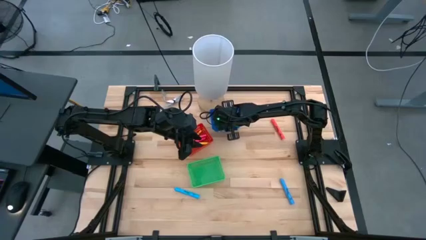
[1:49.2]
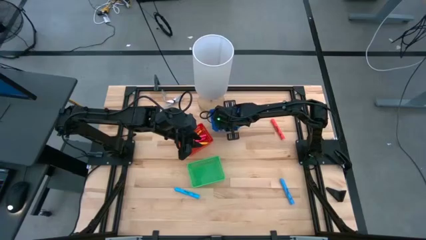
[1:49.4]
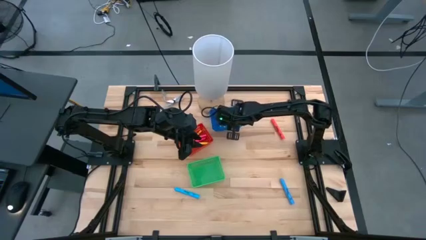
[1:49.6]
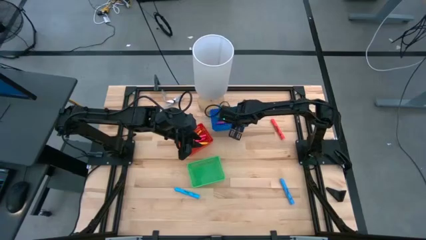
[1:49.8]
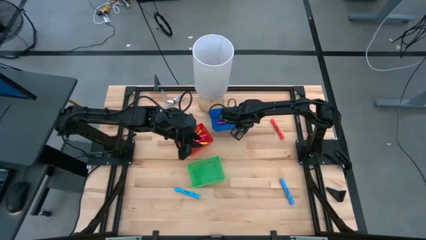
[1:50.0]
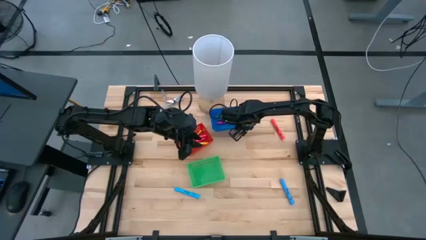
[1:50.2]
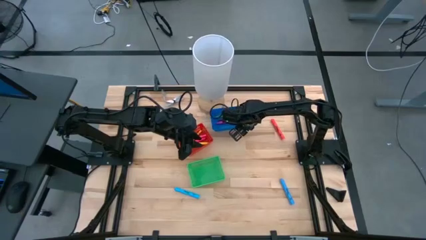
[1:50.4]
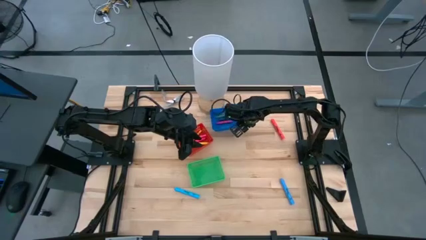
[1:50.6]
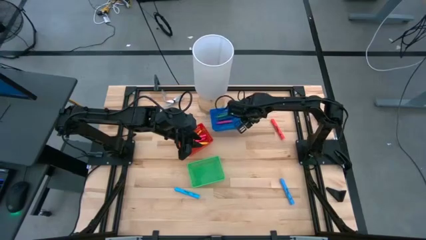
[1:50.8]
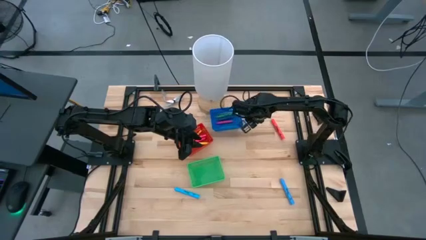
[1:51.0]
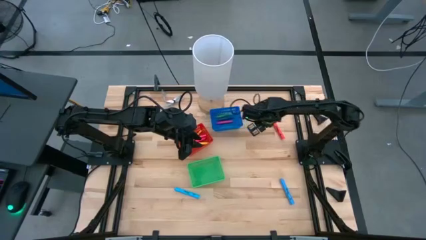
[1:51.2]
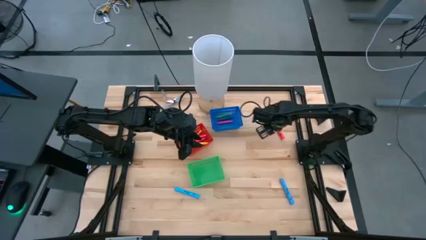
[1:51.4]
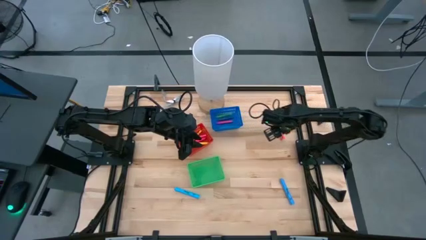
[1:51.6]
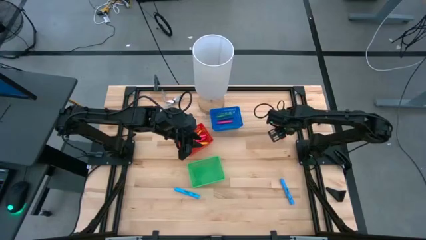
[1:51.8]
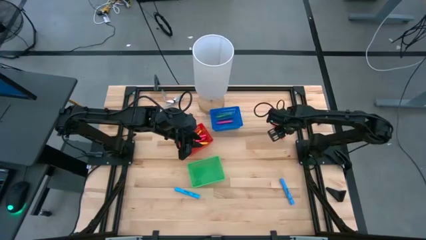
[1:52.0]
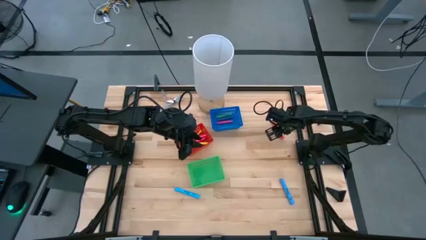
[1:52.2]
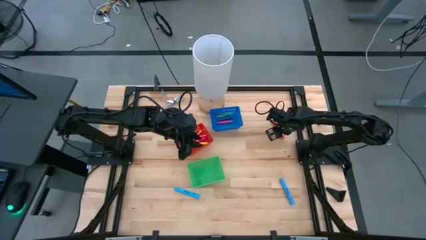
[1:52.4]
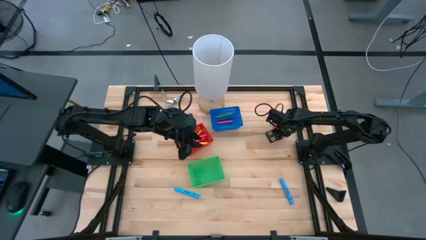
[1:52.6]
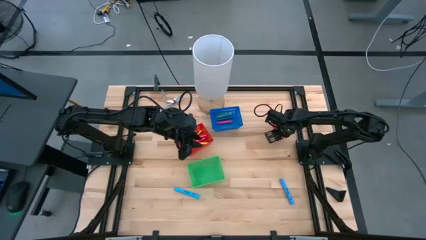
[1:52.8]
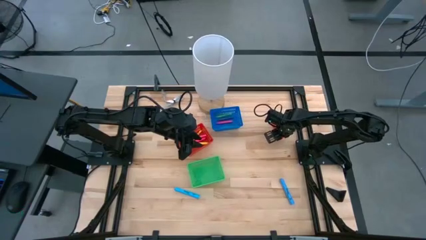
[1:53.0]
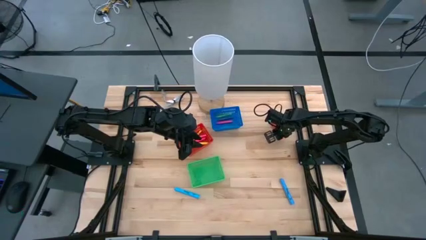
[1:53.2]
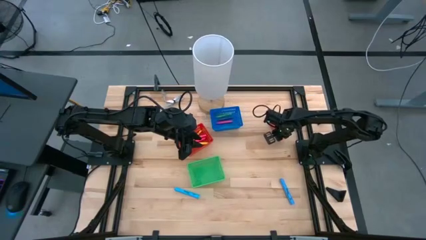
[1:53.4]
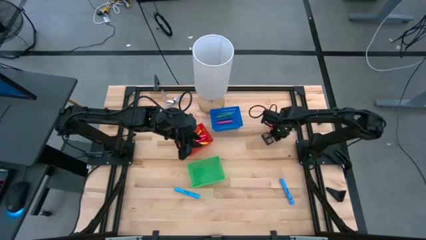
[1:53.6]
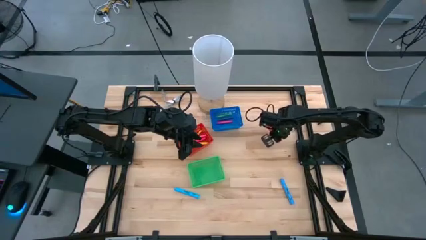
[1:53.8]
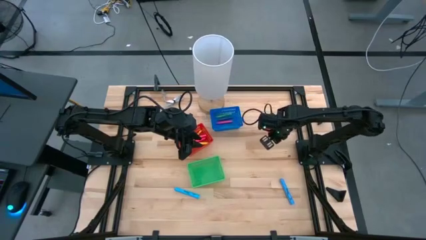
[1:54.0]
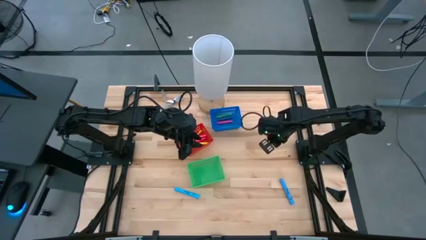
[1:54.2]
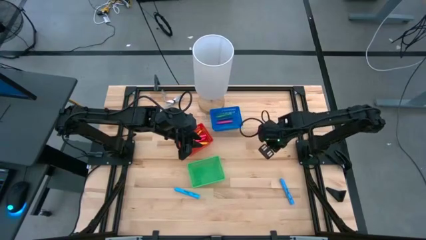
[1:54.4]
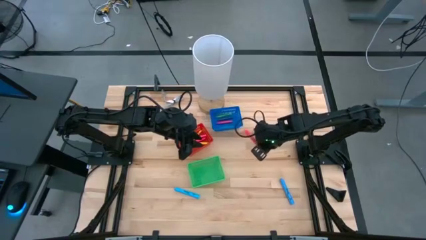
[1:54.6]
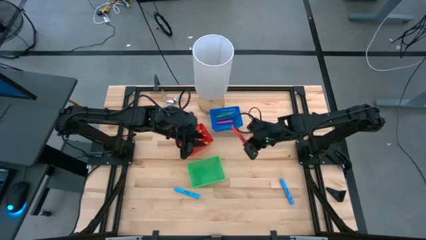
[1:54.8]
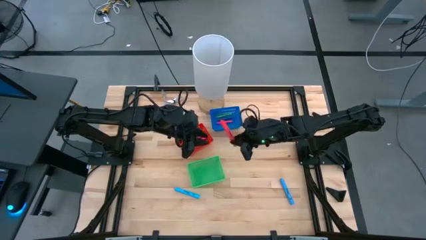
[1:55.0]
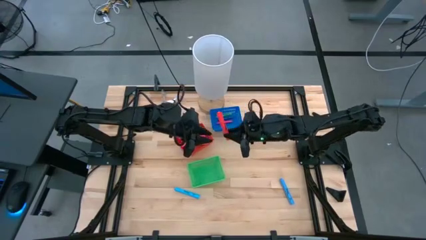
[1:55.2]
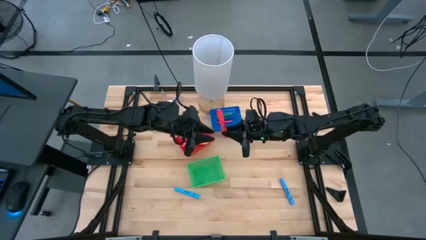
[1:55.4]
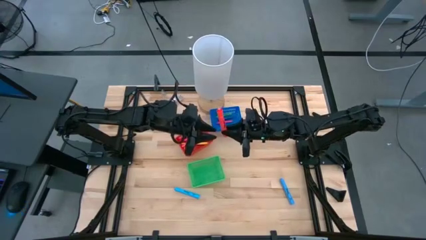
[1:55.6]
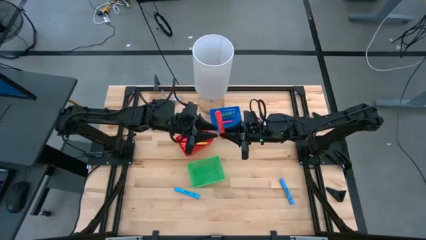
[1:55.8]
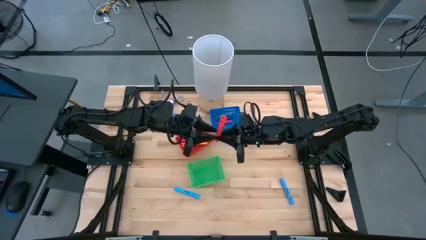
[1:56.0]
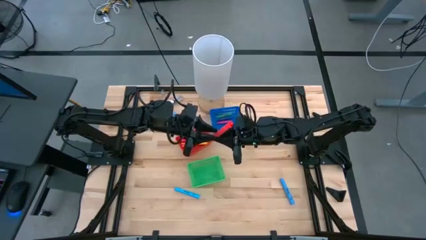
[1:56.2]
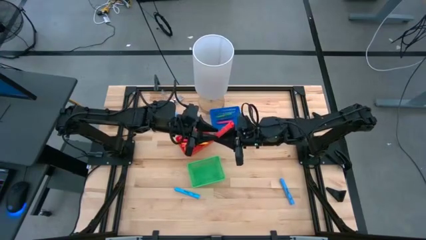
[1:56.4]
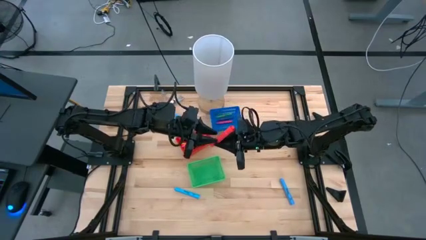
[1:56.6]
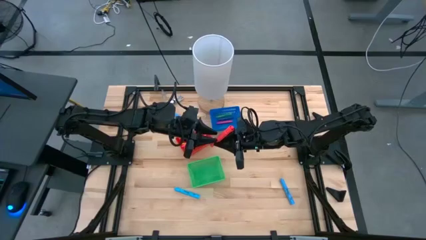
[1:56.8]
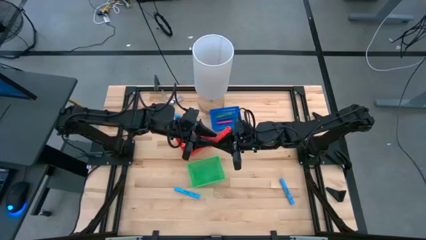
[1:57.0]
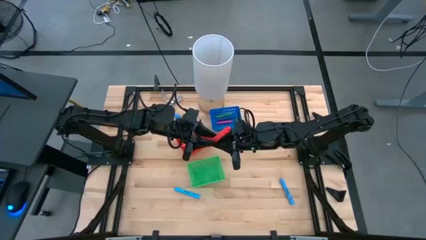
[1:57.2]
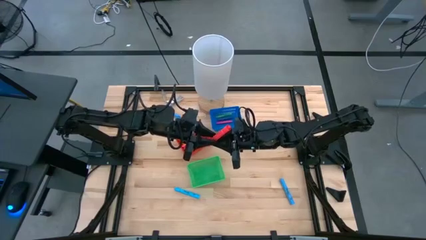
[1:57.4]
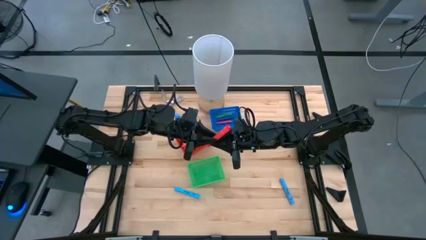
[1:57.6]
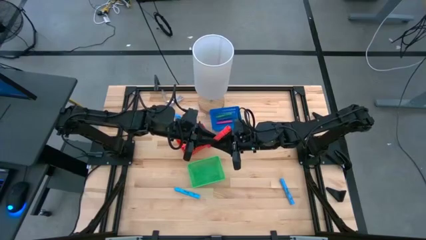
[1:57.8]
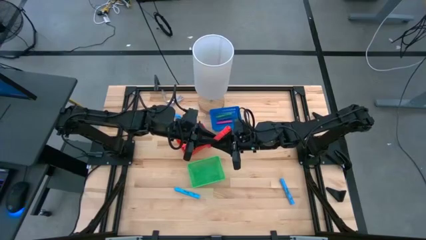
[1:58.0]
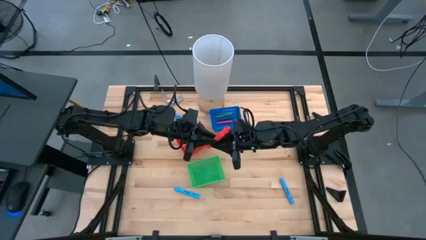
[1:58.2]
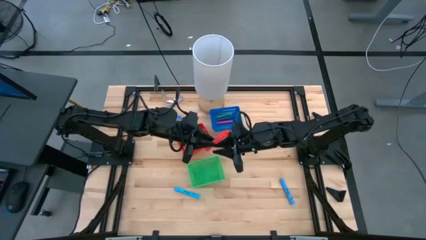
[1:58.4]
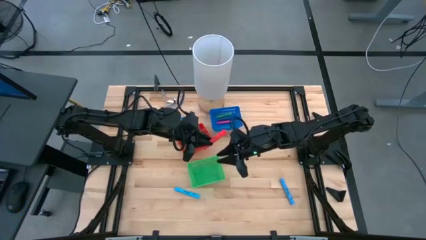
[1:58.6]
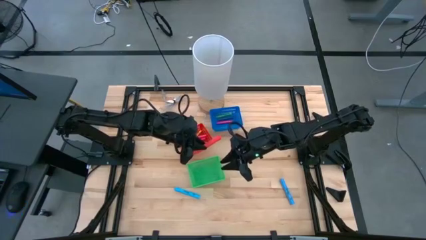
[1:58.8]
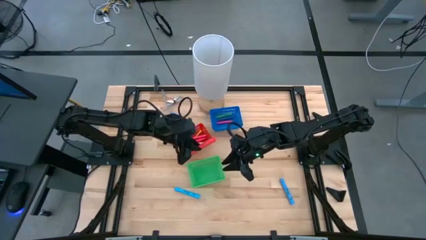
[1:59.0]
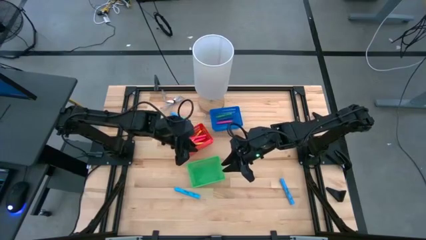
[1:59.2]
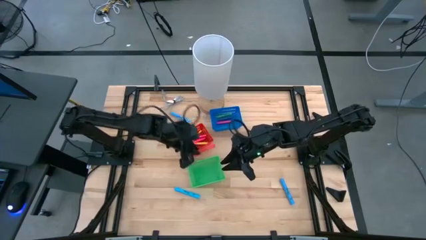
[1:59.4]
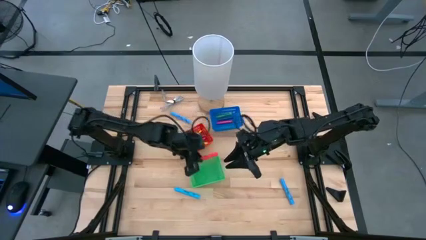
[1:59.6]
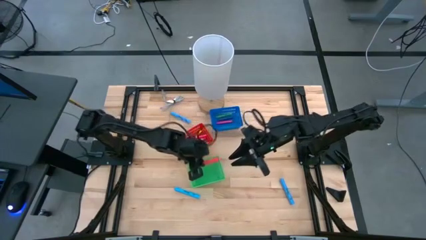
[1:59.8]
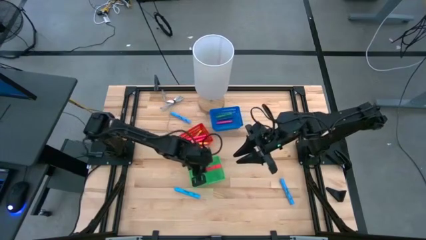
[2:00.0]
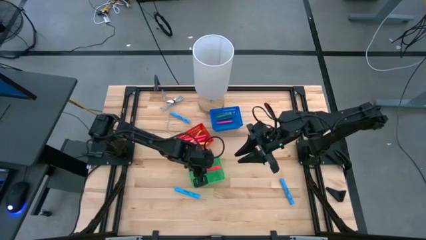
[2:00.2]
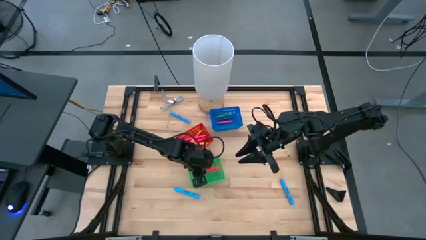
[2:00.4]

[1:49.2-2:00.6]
Task: Pick & Place Markers
Put the pink highlighter into the green bin

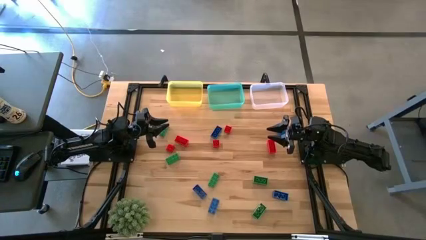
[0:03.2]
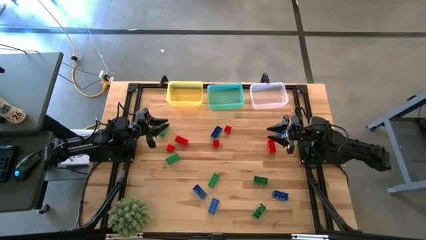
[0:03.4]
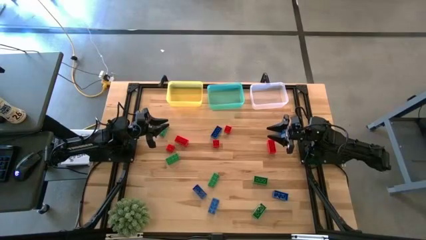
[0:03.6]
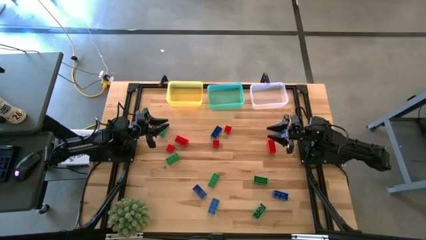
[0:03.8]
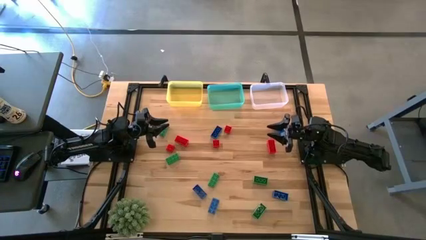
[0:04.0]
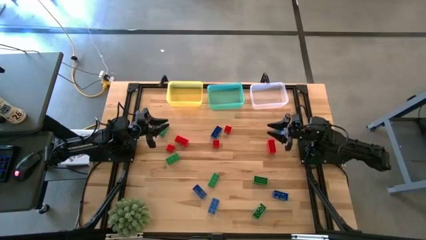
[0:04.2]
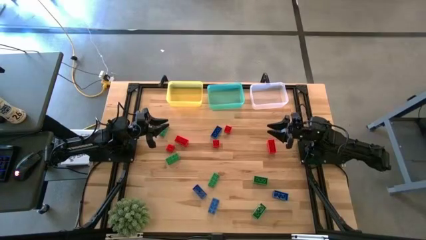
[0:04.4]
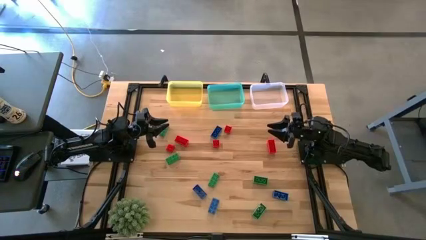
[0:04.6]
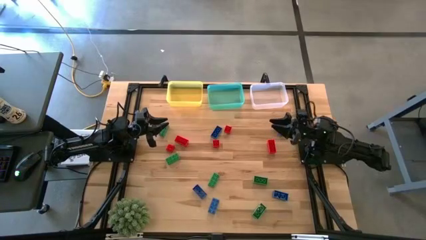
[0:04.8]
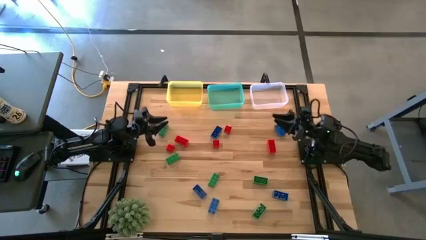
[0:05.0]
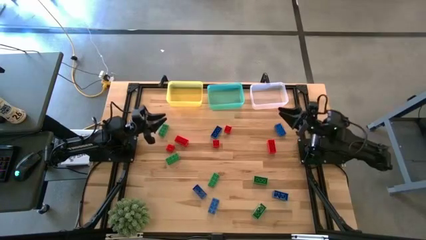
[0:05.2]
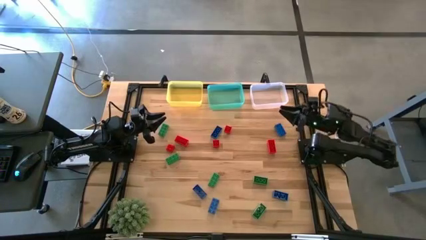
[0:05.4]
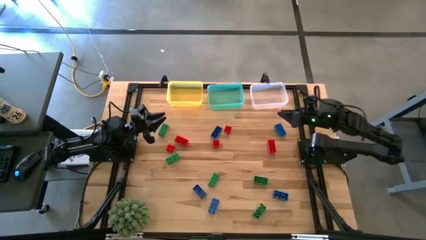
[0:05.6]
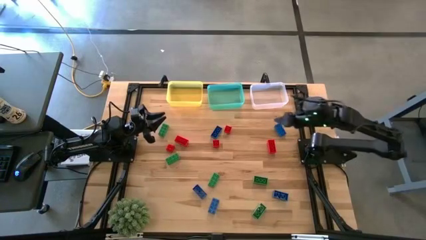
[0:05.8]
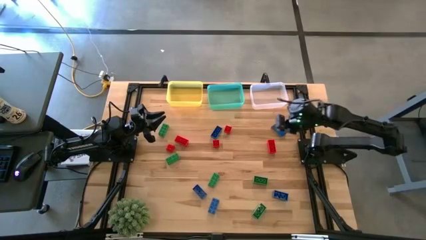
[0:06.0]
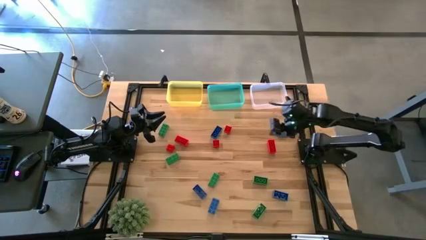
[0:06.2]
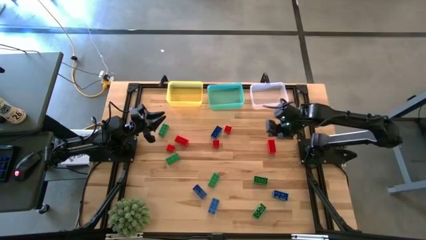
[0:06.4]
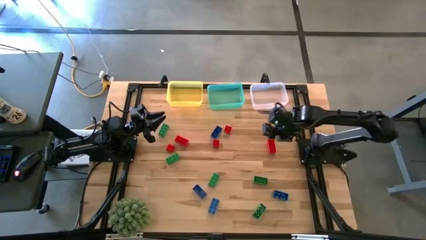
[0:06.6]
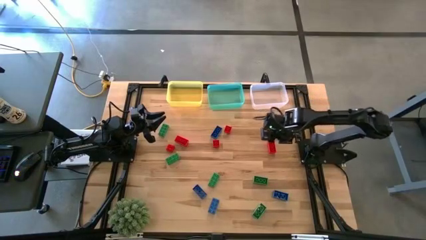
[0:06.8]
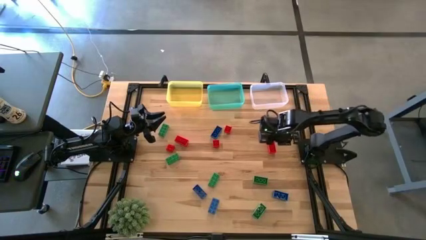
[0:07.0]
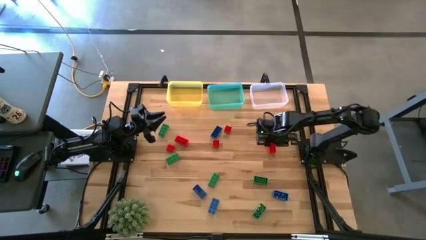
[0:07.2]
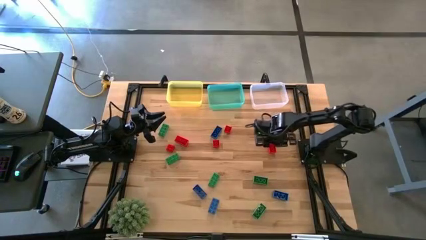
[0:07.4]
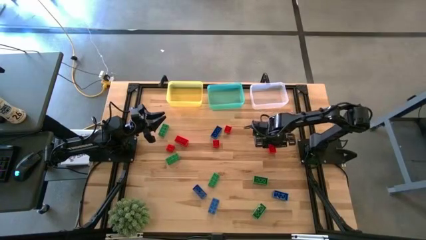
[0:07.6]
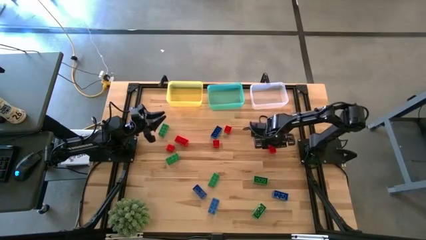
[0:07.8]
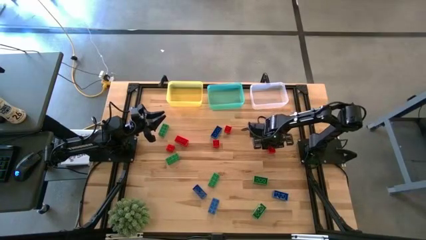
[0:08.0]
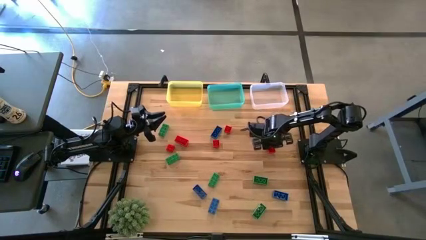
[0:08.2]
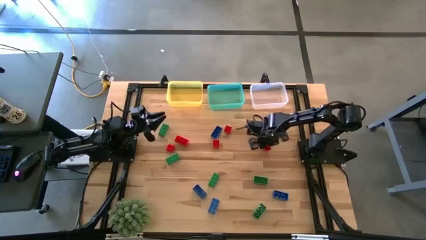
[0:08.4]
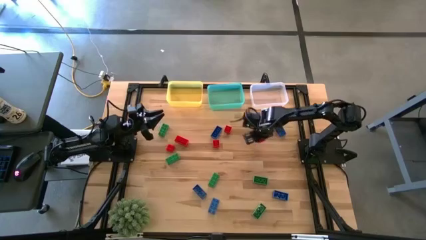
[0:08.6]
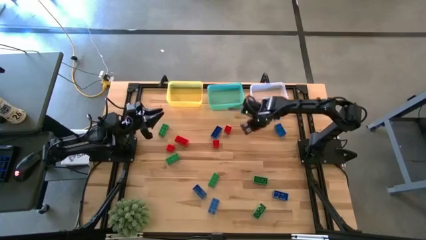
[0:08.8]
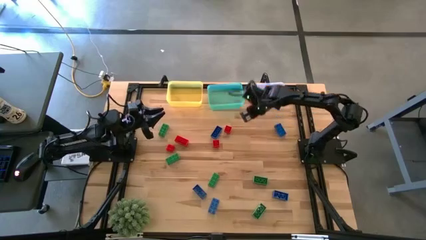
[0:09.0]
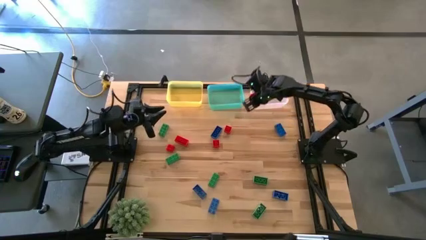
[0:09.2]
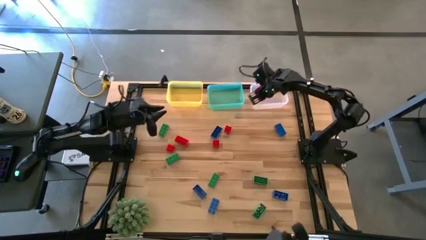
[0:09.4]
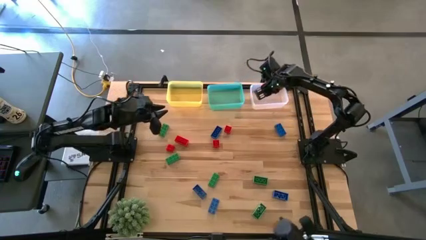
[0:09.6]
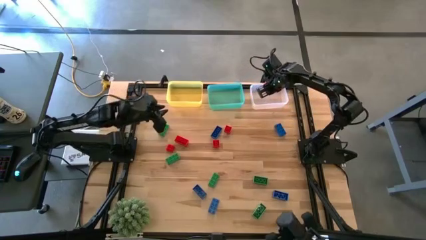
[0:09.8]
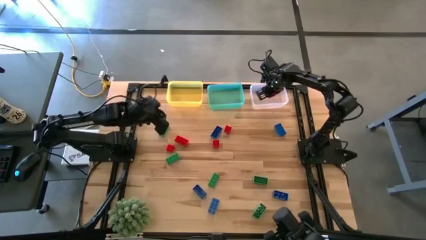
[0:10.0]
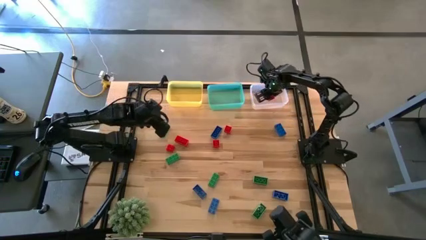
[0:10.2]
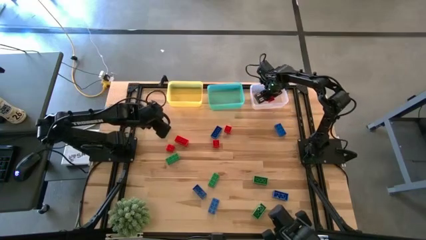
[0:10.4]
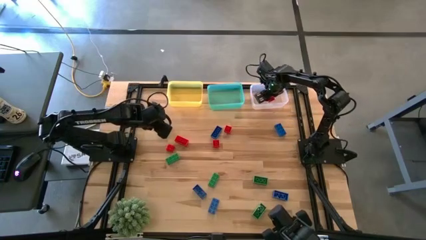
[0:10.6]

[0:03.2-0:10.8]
Task: Sort & place blocks by color
Put the red game piece into the white bin
